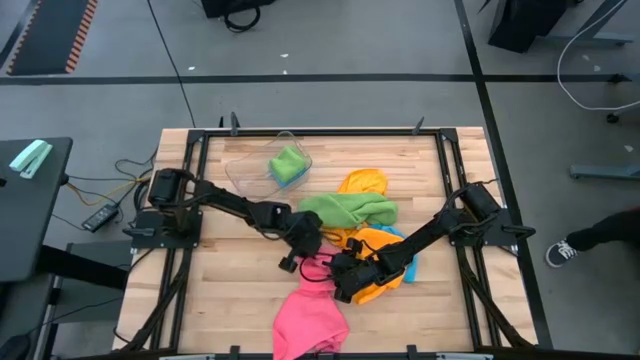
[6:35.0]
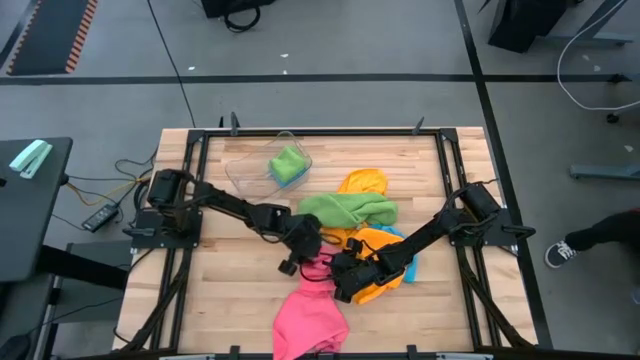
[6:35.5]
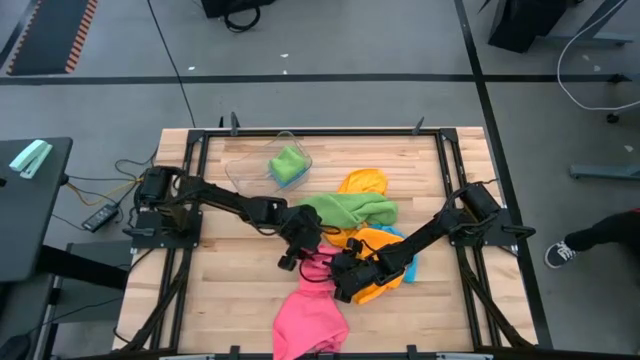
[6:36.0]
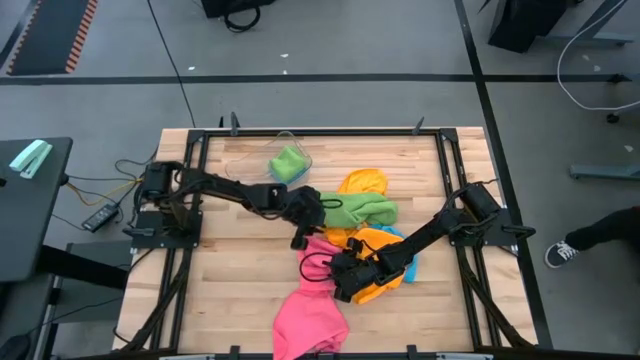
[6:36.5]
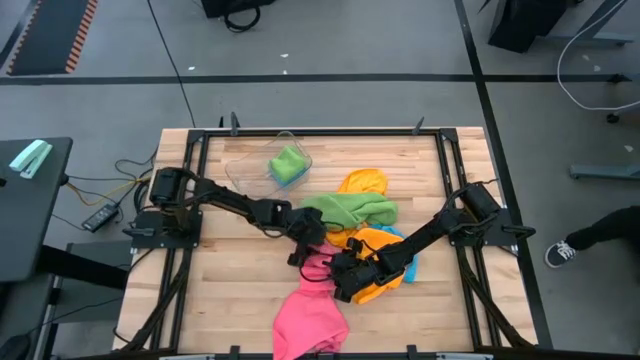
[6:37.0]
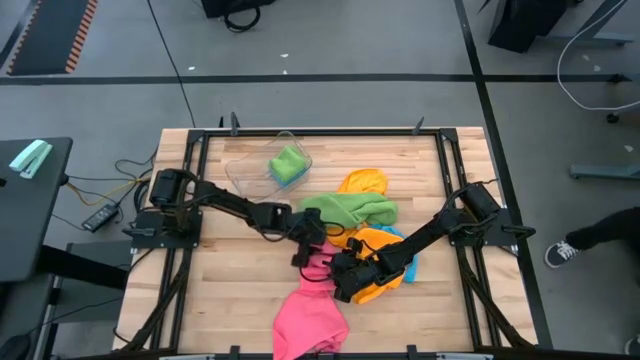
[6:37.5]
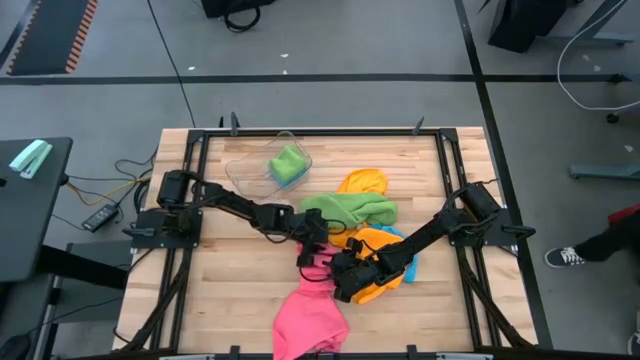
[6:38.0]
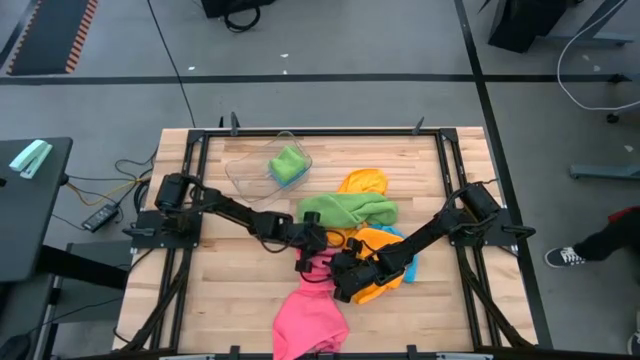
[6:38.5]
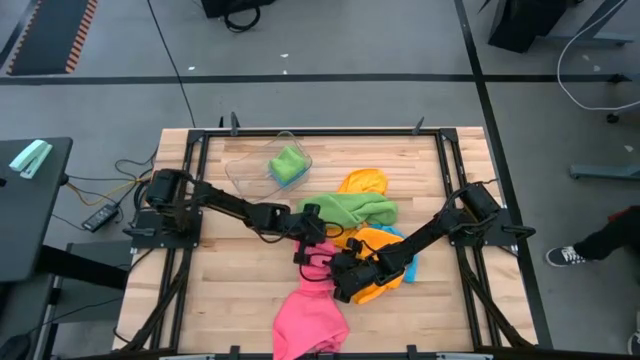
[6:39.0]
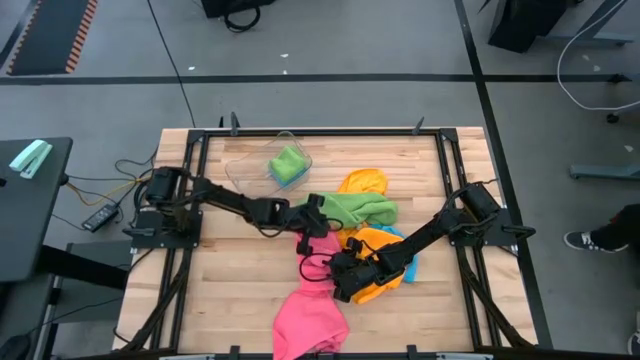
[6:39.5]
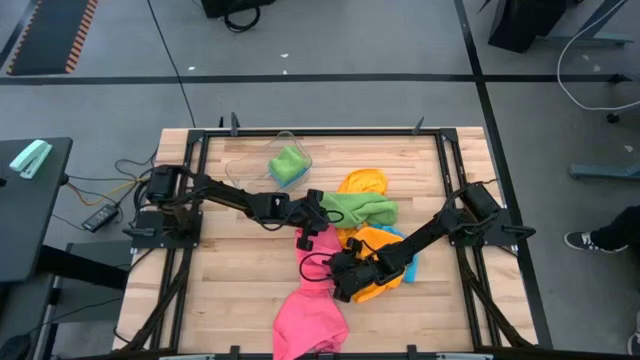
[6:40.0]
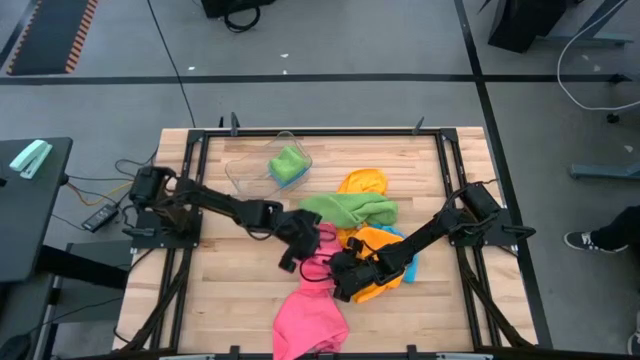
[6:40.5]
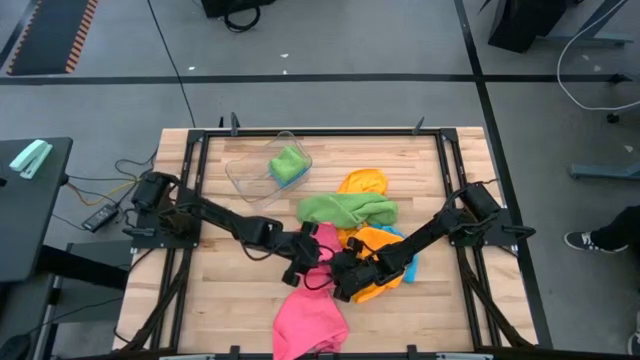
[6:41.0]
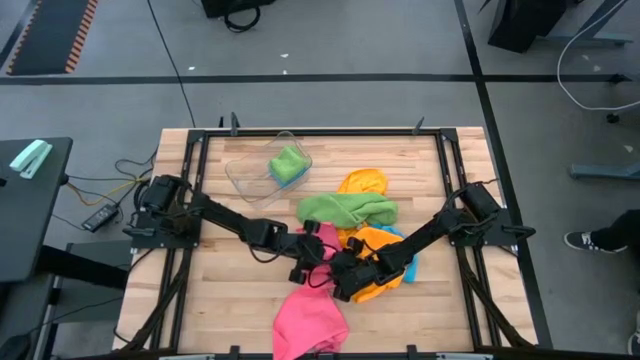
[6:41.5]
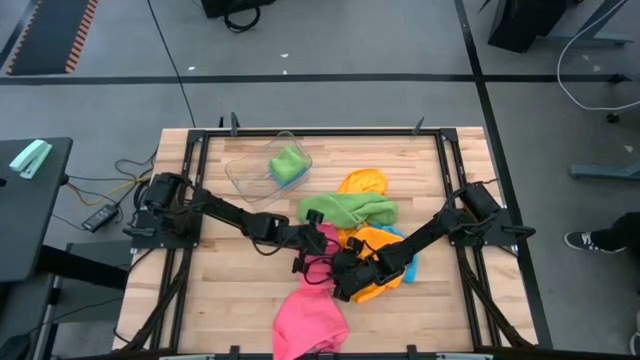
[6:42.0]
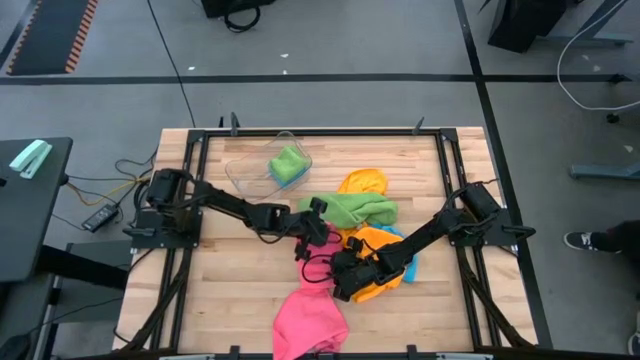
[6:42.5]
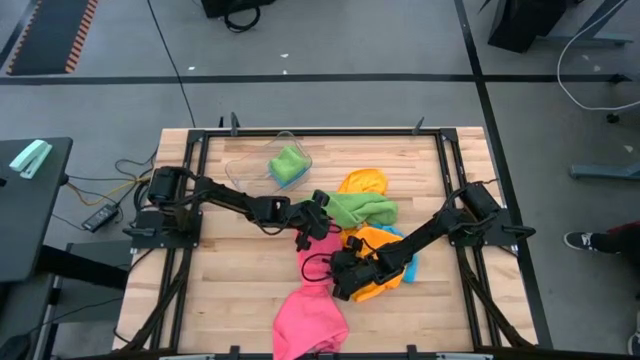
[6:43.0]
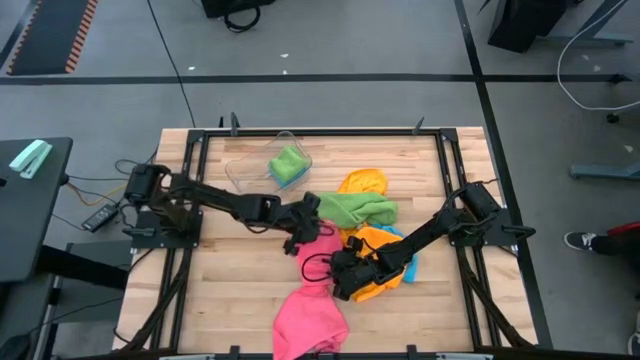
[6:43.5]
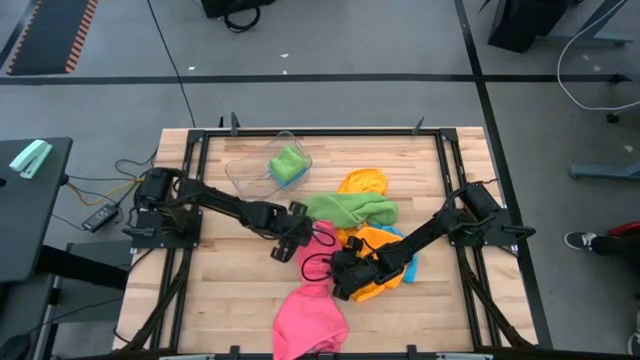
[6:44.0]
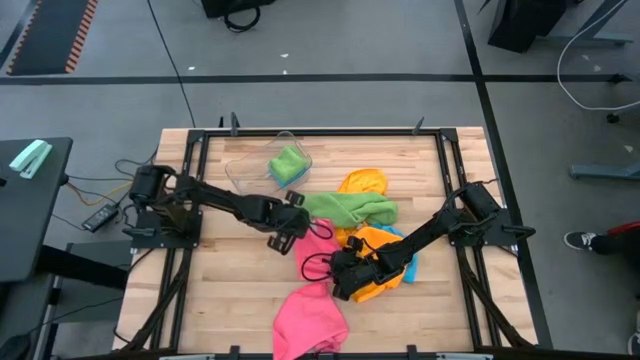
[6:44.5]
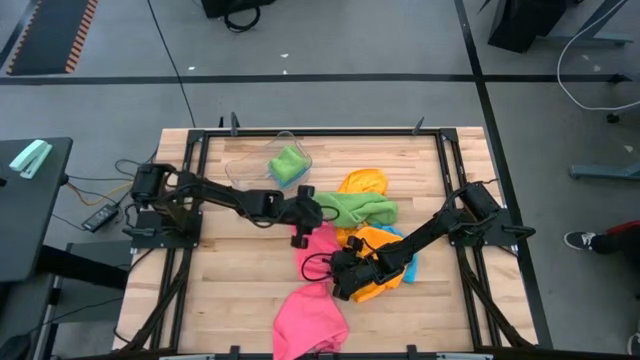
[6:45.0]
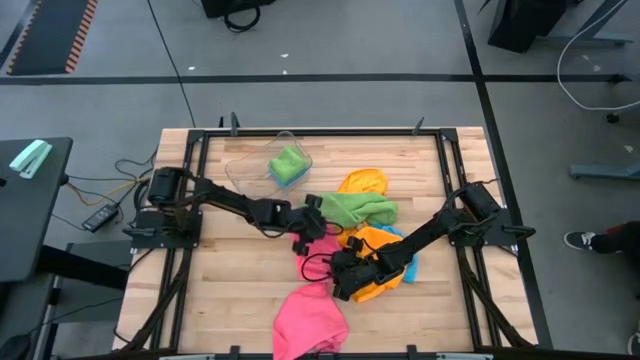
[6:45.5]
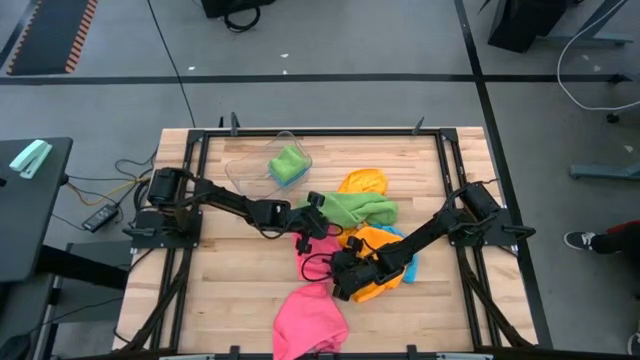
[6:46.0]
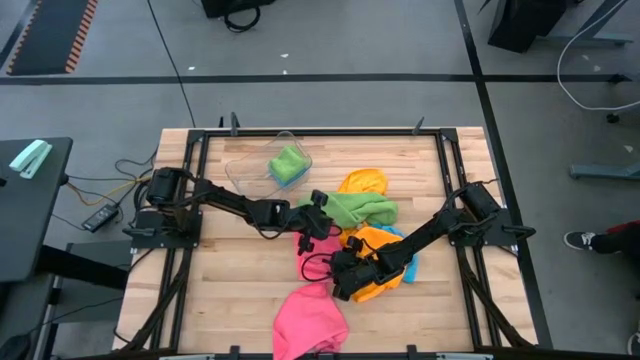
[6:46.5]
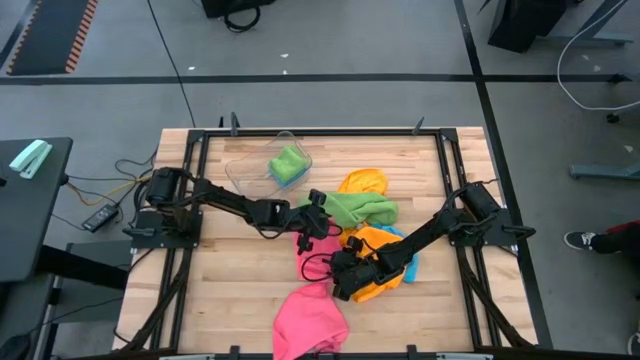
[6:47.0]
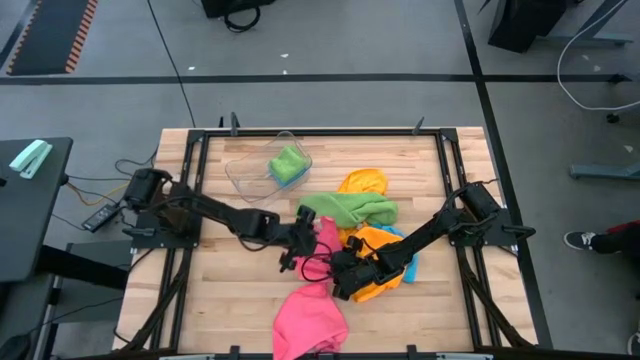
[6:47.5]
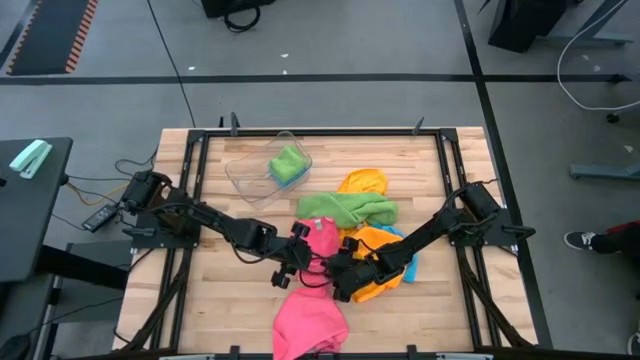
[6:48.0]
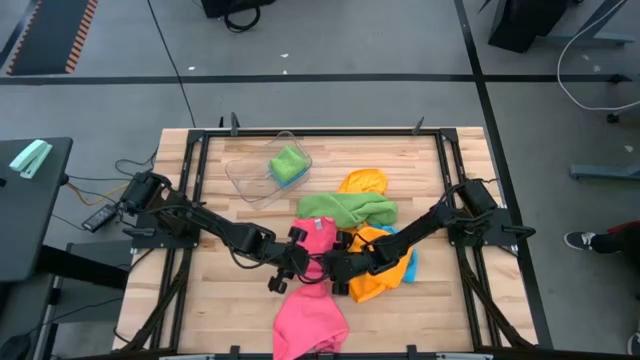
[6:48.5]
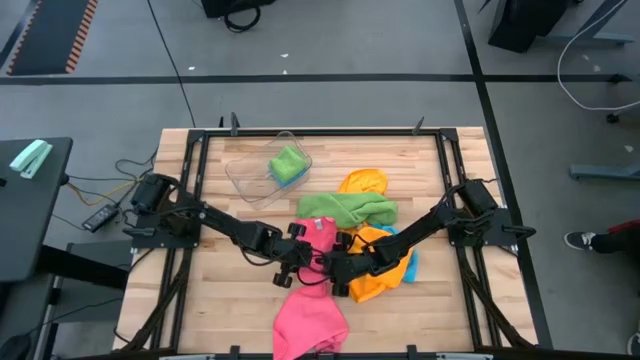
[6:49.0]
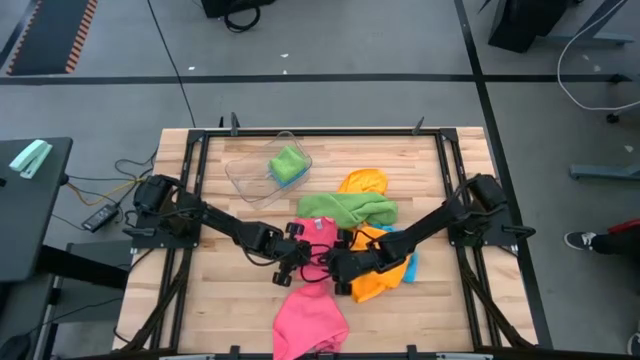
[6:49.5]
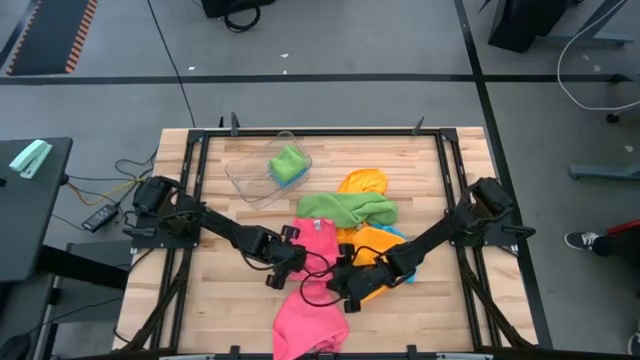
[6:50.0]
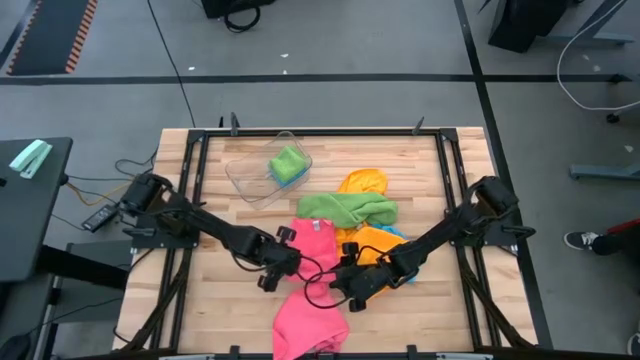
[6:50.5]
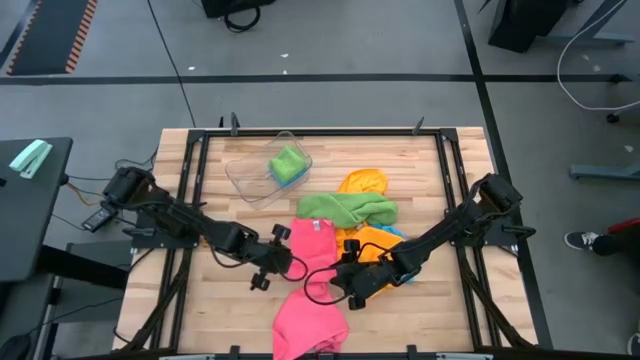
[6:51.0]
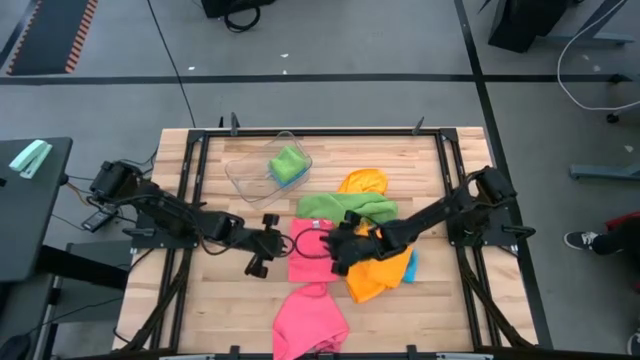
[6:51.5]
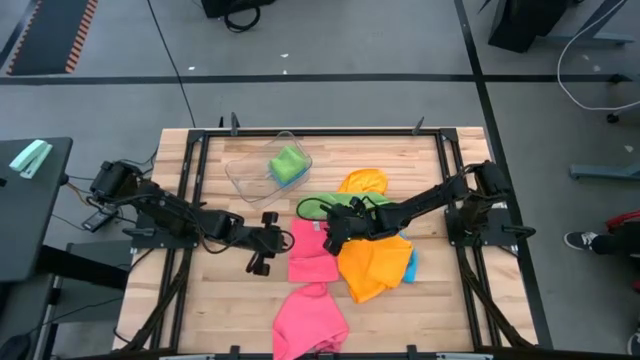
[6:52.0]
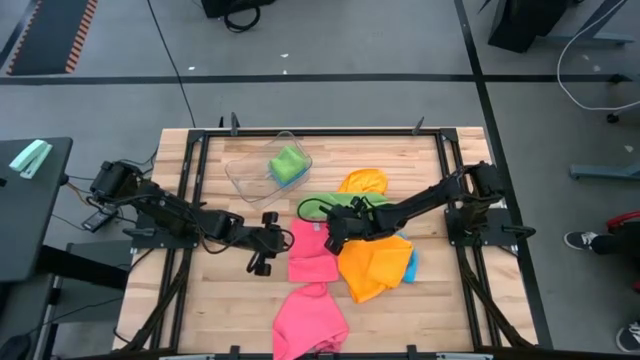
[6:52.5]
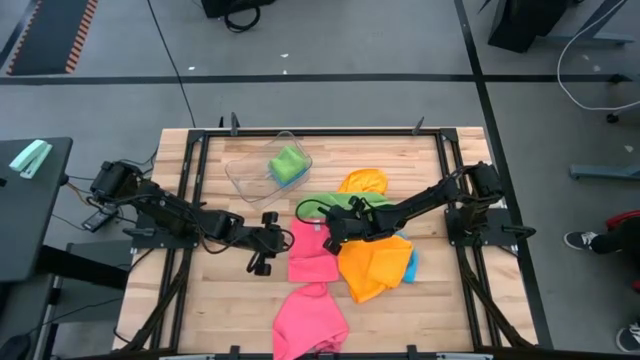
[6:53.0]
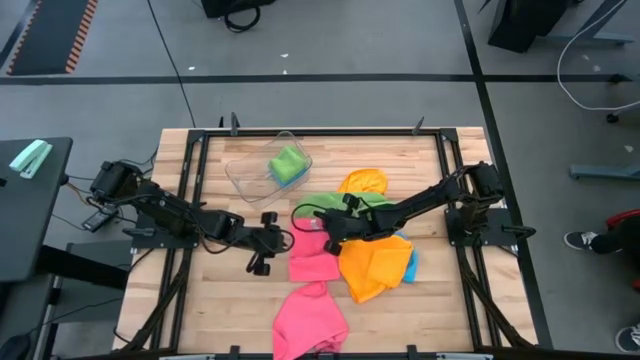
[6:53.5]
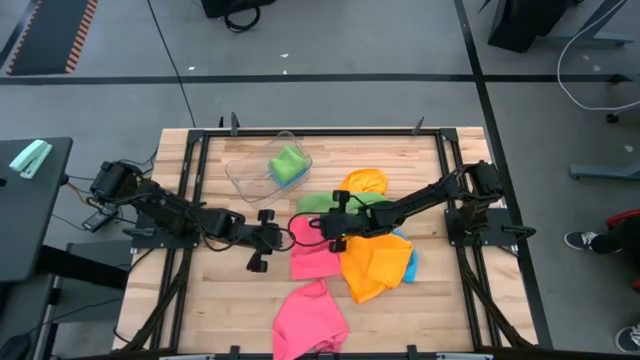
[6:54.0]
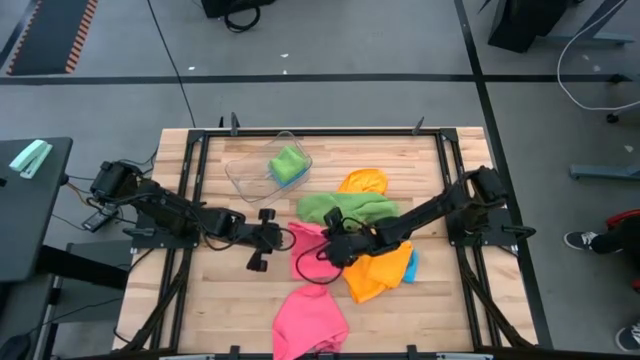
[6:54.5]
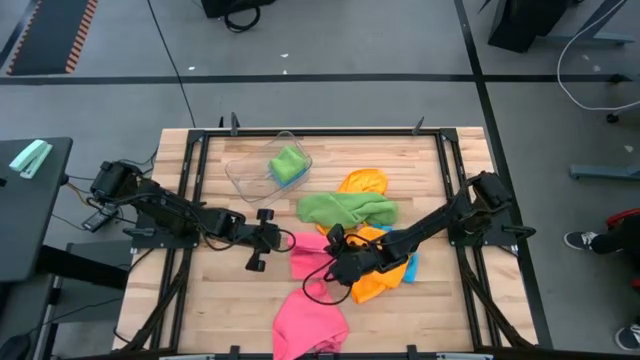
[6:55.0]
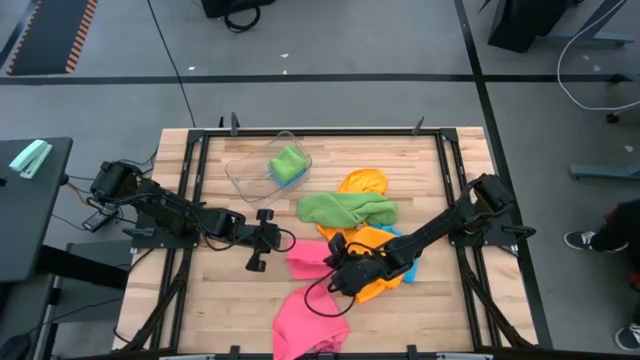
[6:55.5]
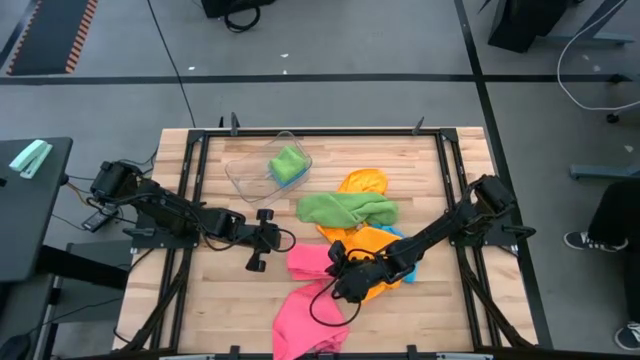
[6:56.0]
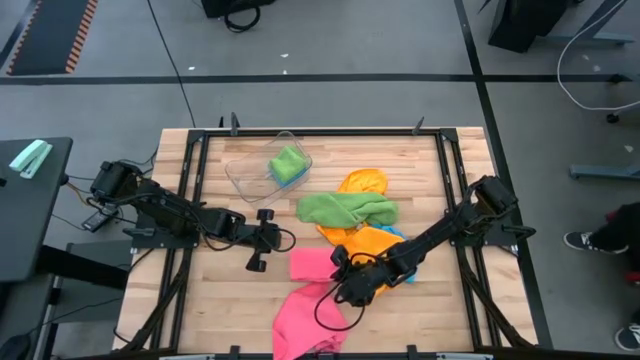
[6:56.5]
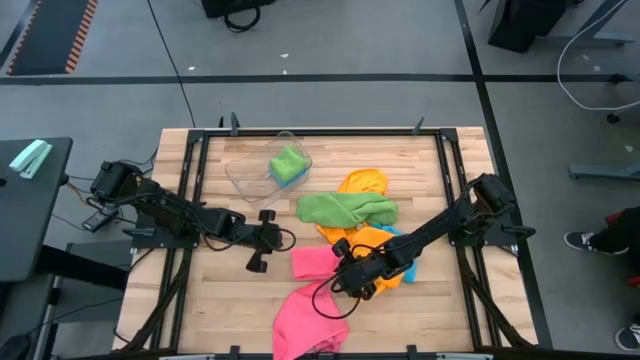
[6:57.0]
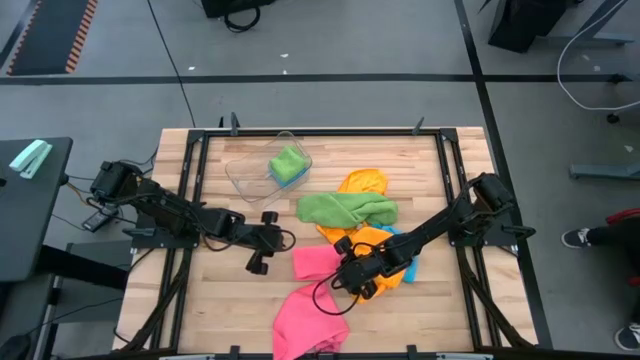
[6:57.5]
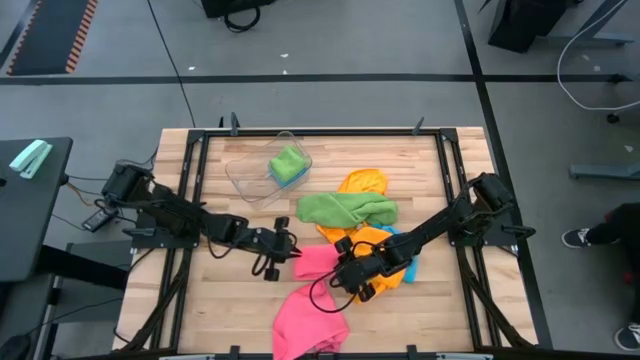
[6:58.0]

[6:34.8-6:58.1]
Task: Fold microfiber towels
Fold the left pink microfiber towel
